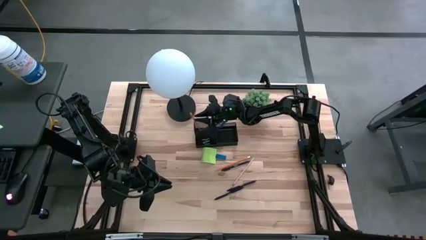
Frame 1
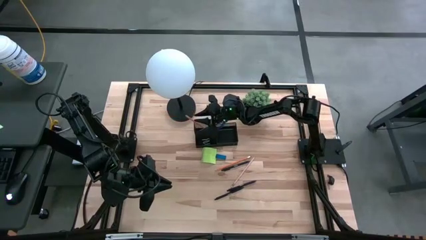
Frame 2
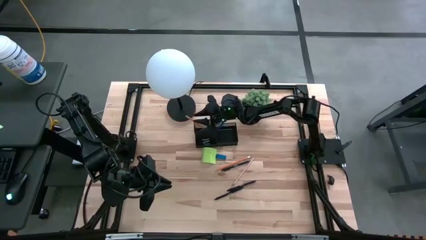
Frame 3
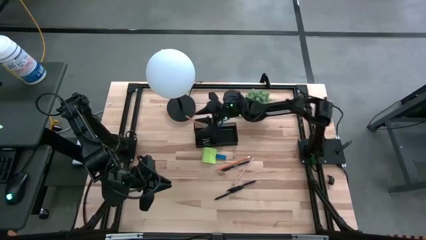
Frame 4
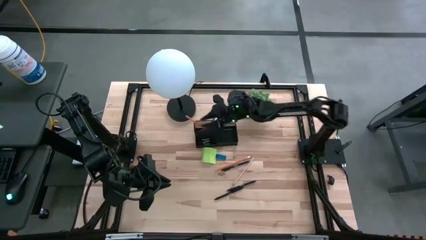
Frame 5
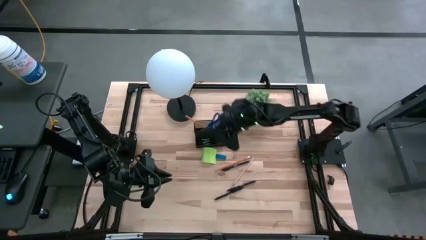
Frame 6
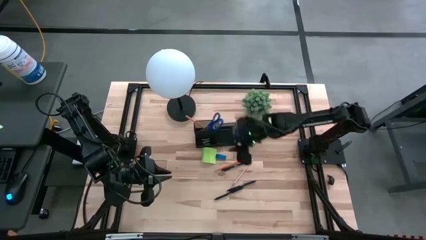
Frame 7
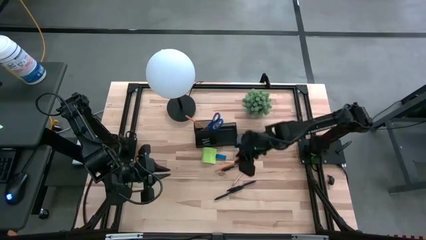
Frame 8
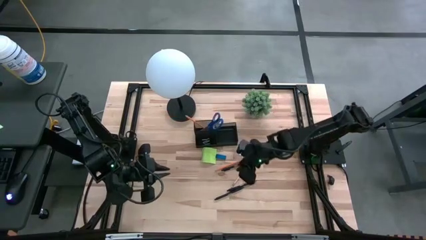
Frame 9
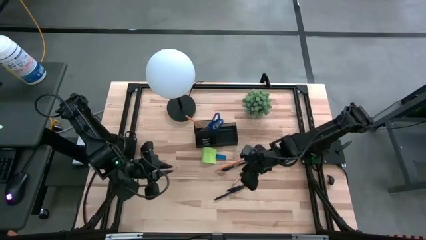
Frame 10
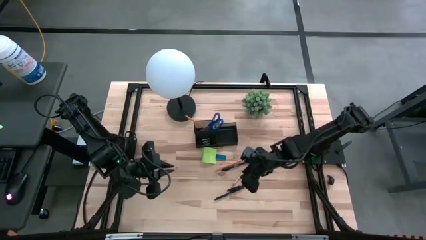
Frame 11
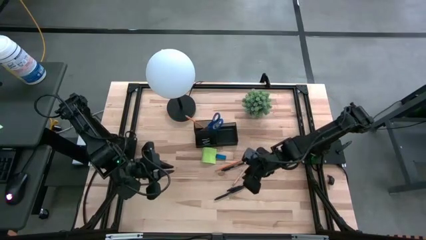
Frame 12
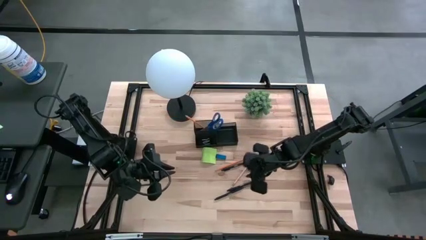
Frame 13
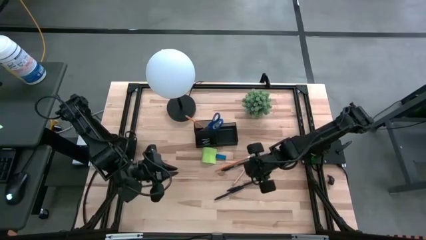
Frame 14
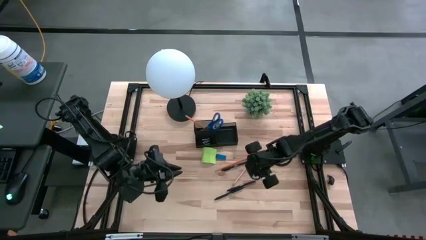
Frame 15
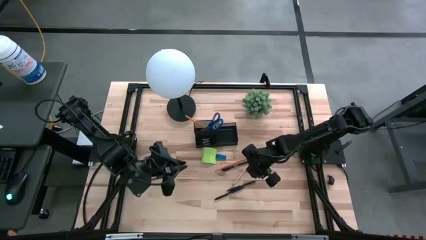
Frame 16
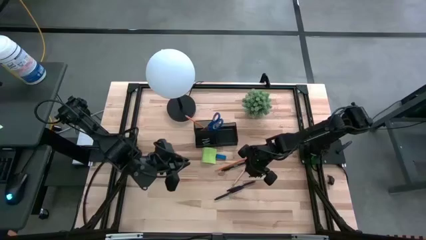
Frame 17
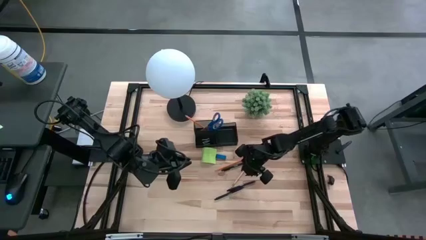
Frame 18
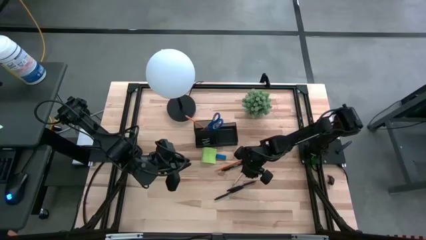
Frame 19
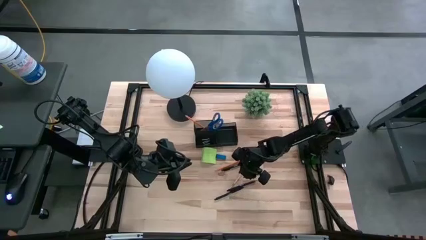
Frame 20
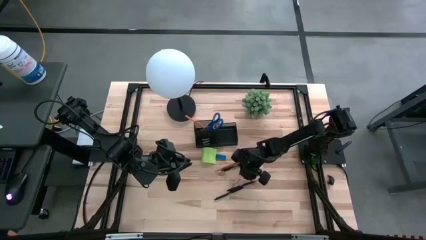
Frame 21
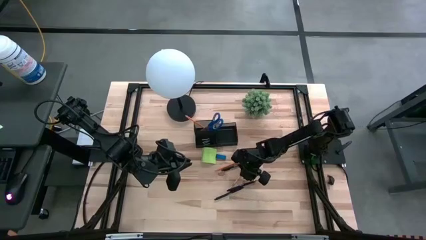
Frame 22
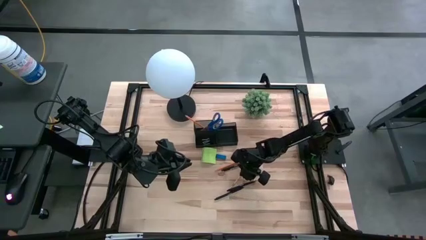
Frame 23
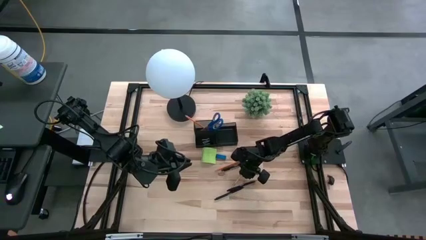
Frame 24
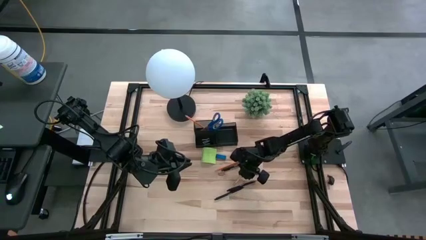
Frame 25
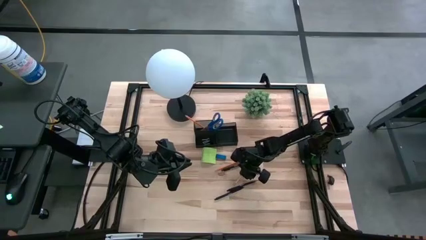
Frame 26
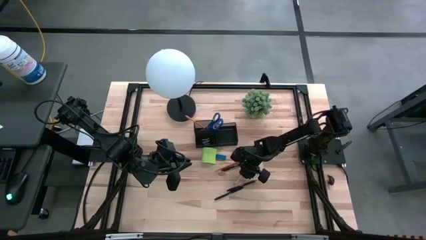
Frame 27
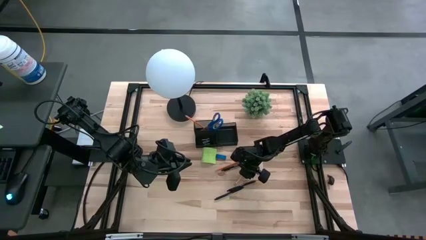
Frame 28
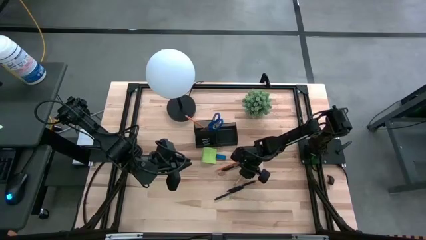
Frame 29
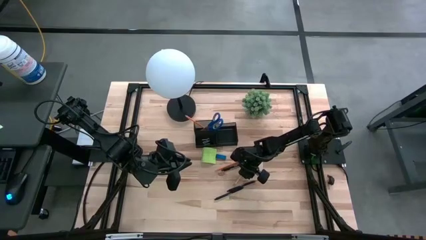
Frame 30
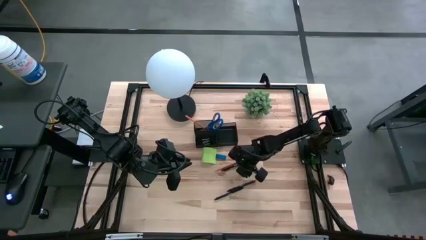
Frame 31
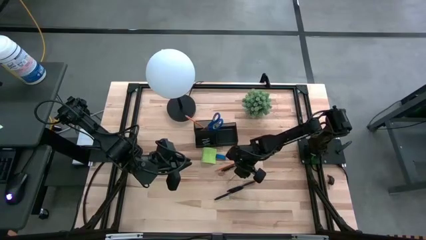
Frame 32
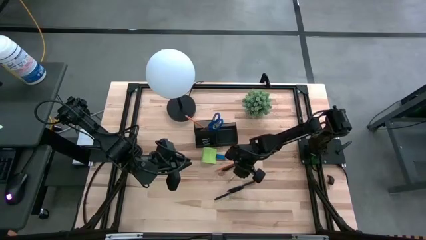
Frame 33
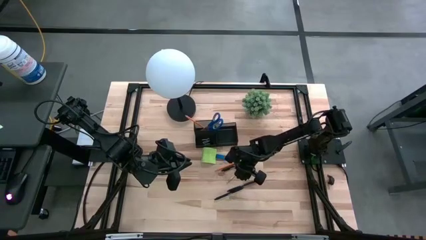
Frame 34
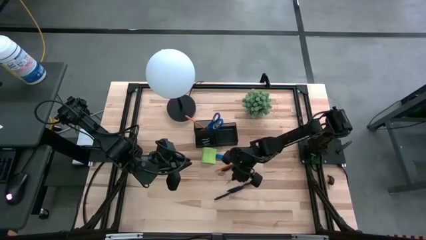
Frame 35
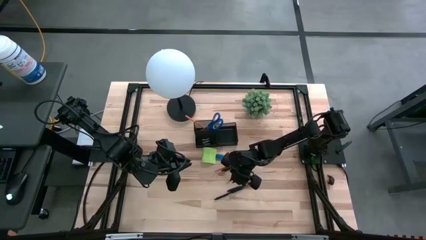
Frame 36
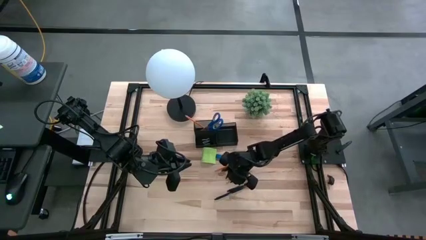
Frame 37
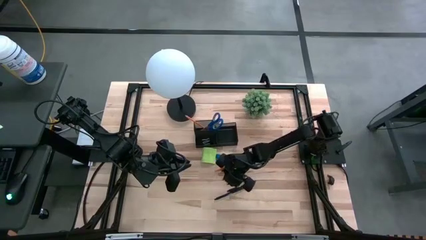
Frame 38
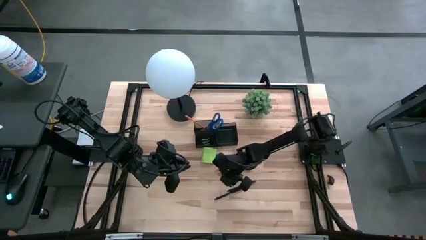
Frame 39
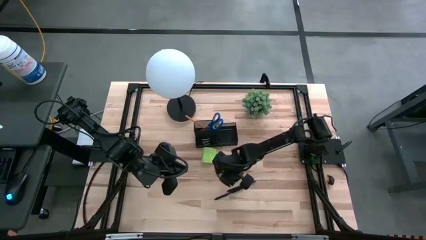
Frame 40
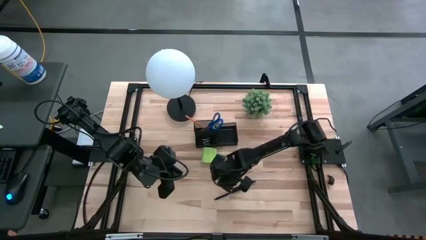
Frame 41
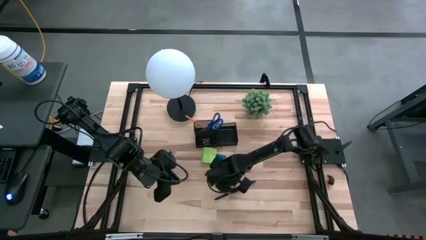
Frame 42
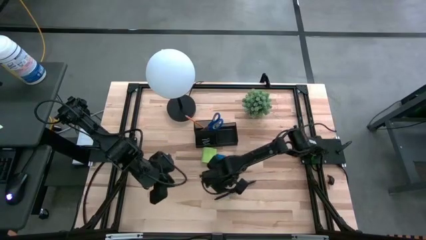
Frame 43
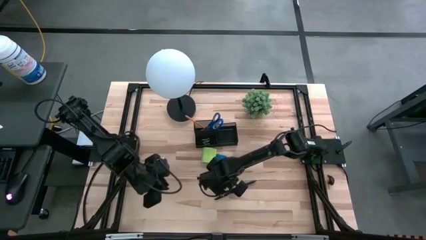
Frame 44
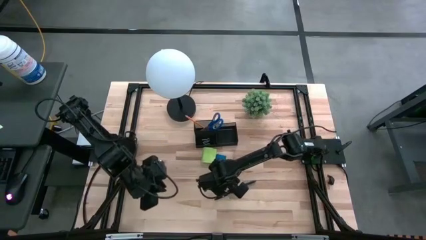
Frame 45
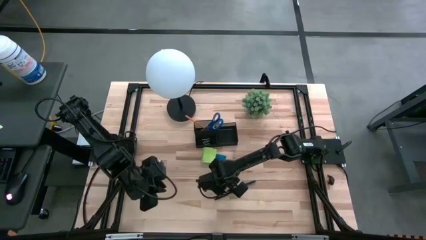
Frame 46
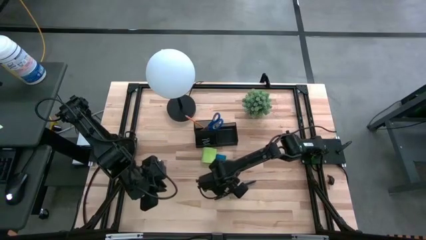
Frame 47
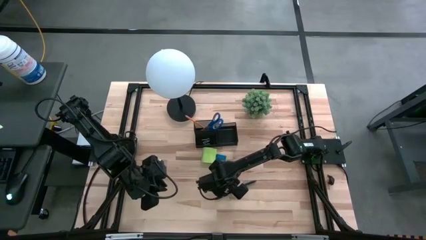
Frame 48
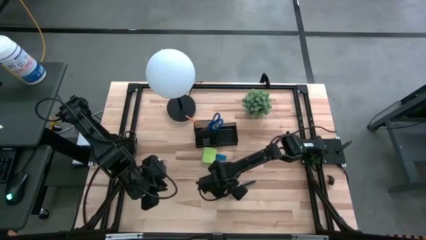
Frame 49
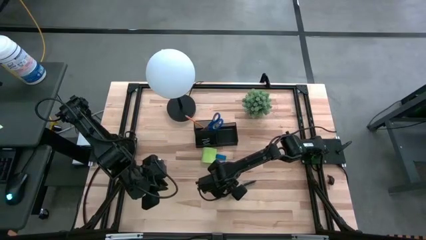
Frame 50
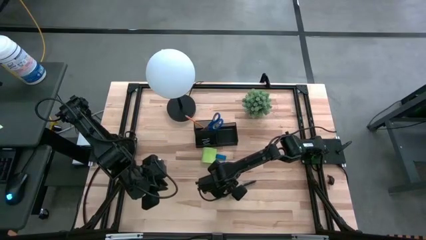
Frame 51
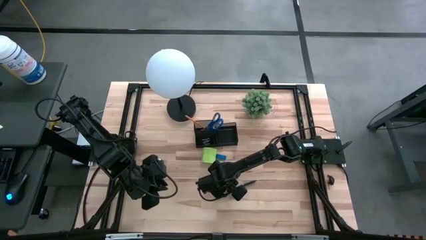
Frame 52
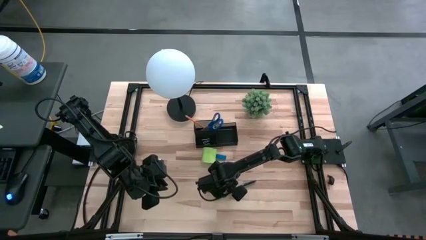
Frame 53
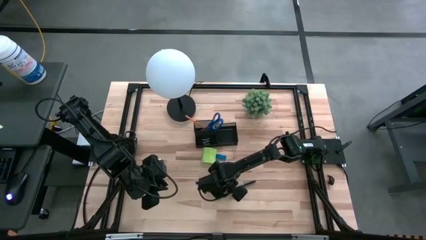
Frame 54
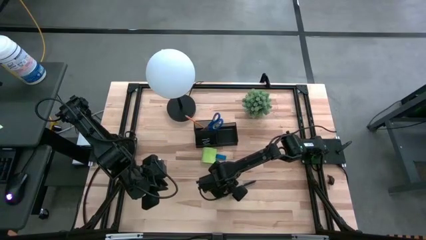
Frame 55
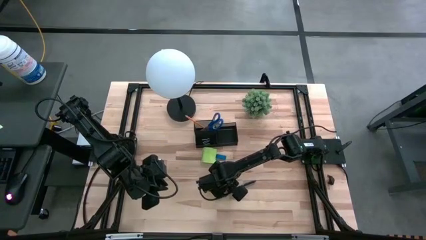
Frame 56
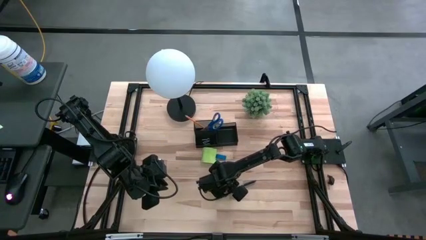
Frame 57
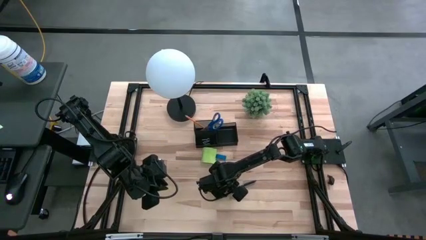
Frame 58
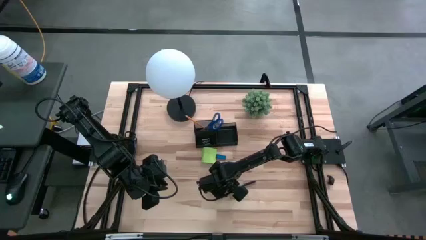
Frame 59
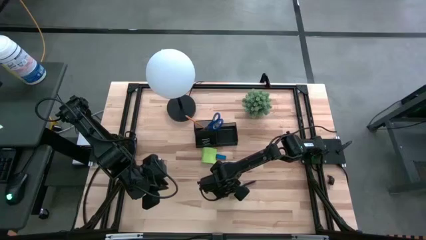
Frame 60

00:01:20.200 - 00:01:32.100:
Task: Pick and place office supplies into organizer
Put the pink pencil into the top left side of the desk organizer
